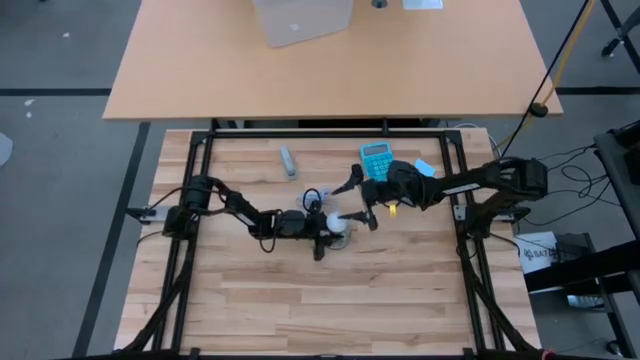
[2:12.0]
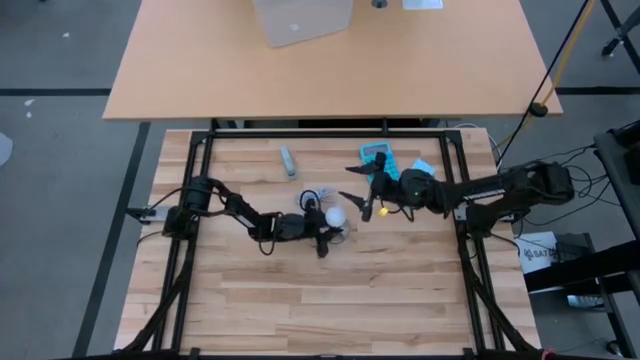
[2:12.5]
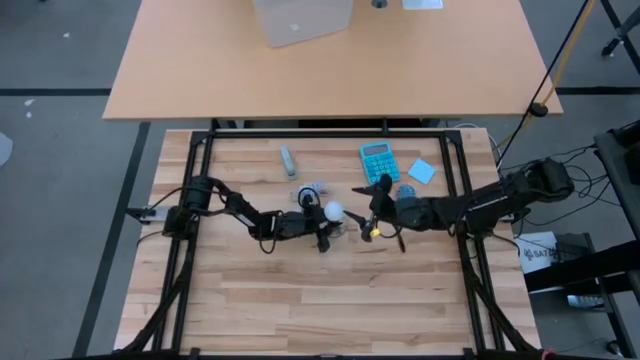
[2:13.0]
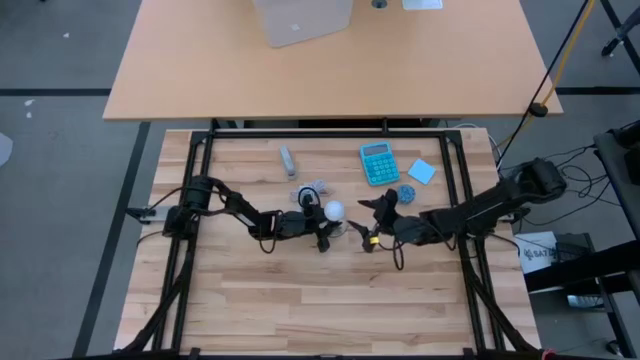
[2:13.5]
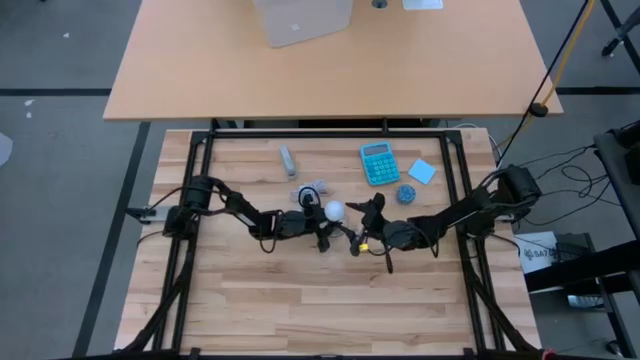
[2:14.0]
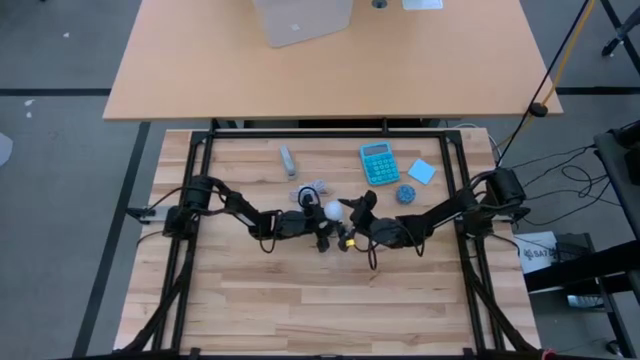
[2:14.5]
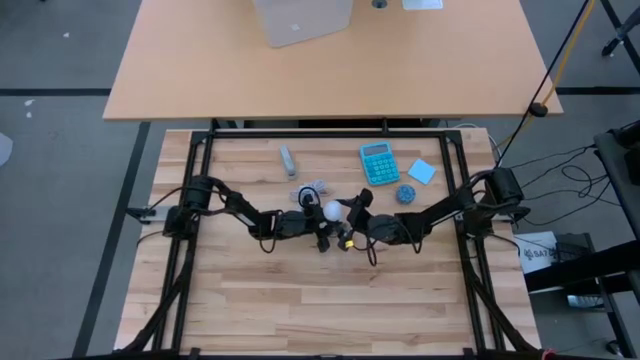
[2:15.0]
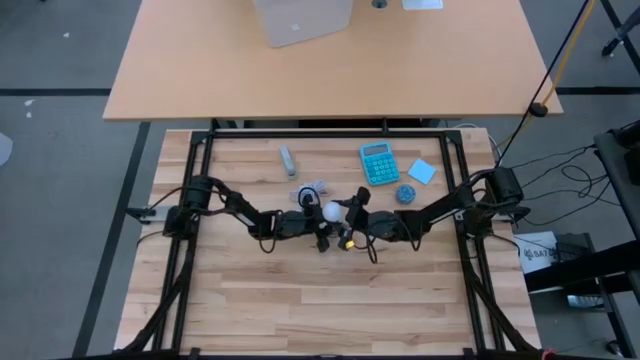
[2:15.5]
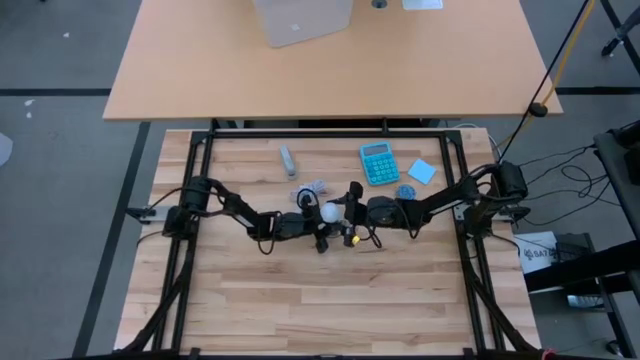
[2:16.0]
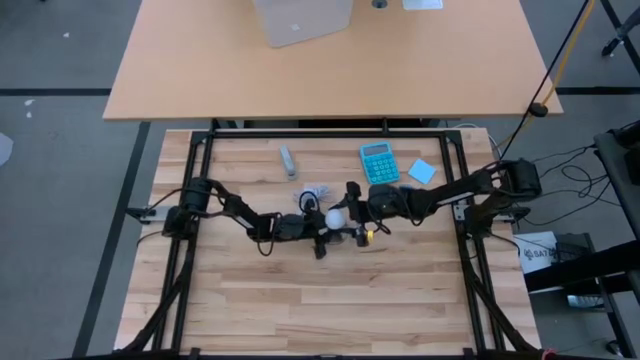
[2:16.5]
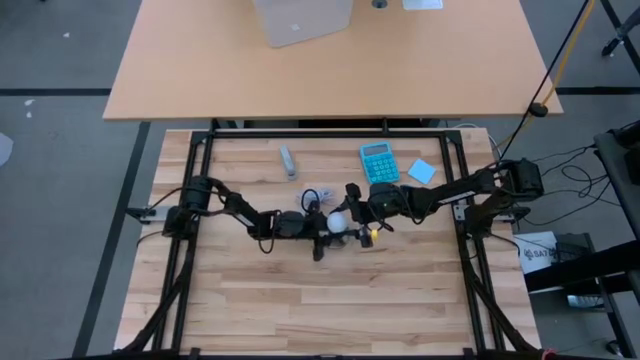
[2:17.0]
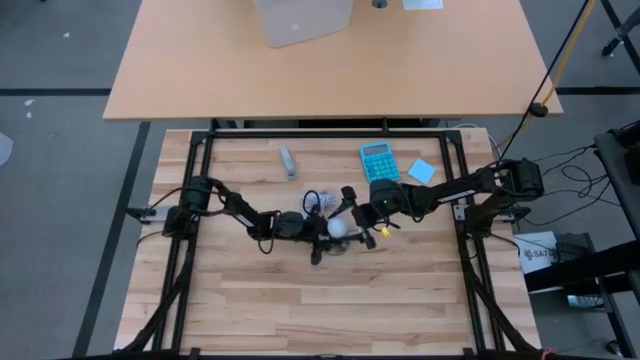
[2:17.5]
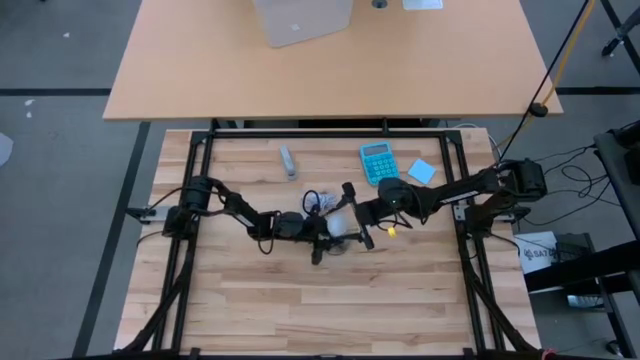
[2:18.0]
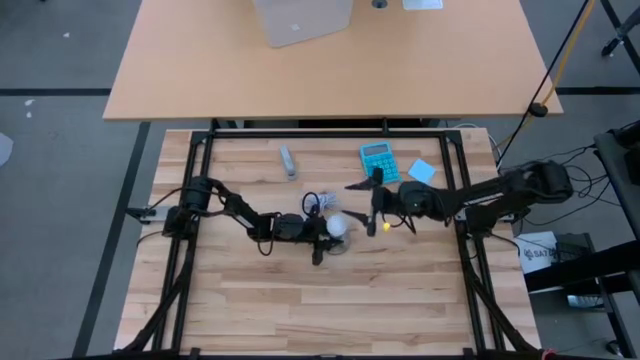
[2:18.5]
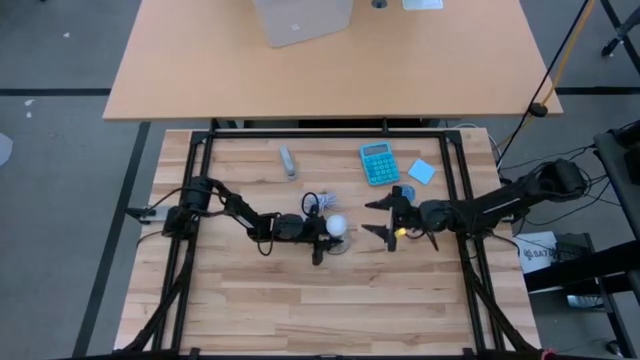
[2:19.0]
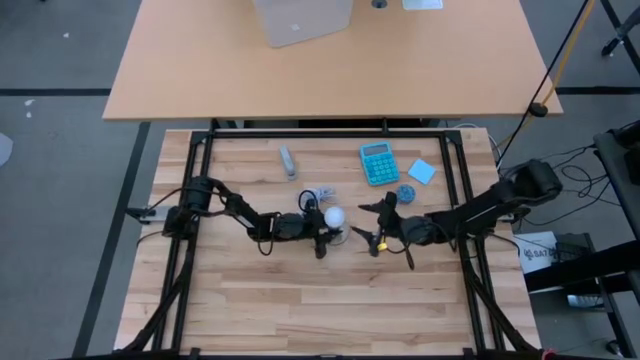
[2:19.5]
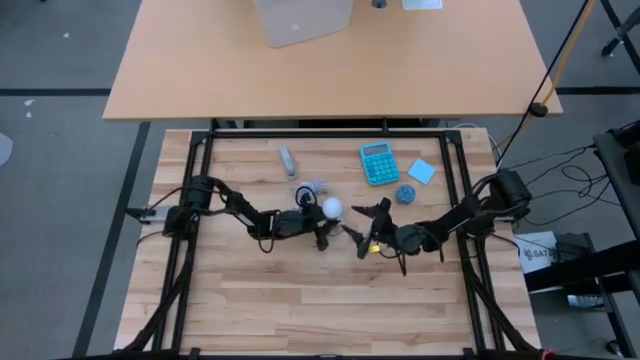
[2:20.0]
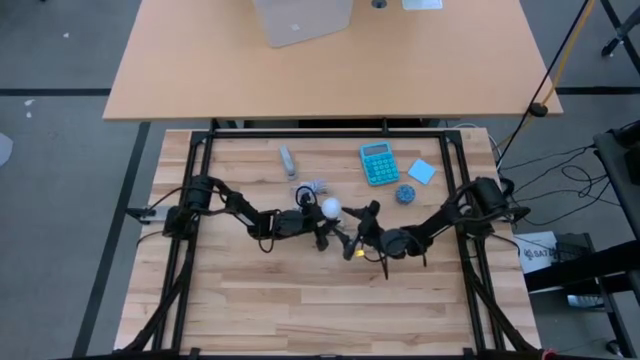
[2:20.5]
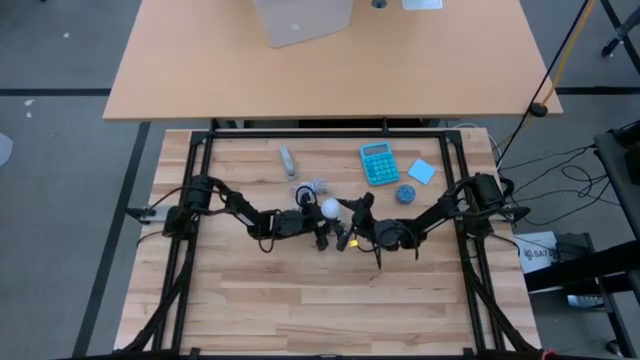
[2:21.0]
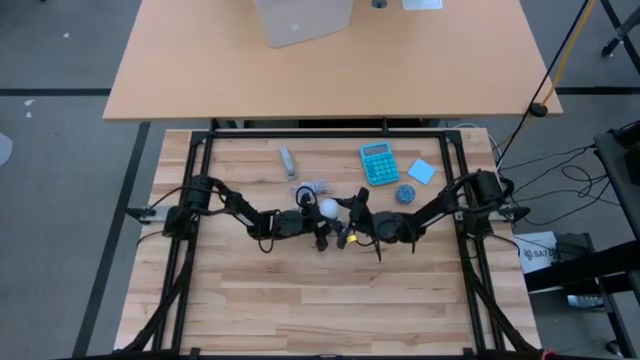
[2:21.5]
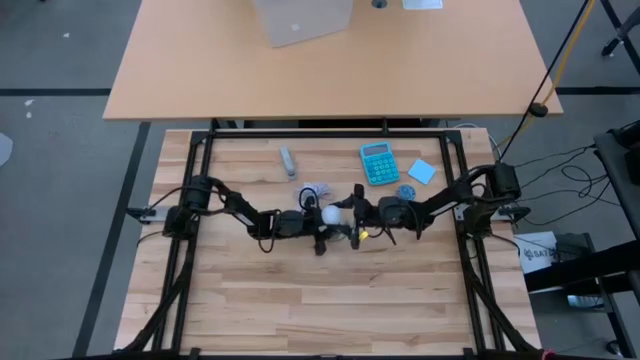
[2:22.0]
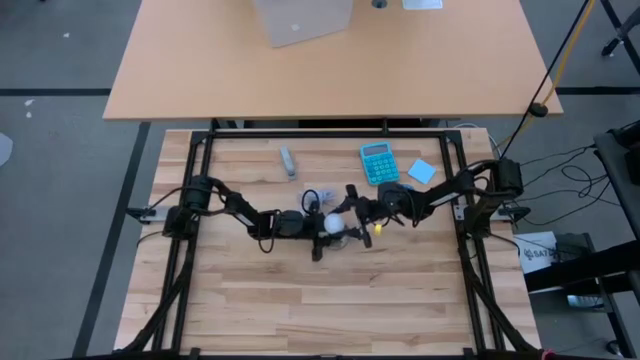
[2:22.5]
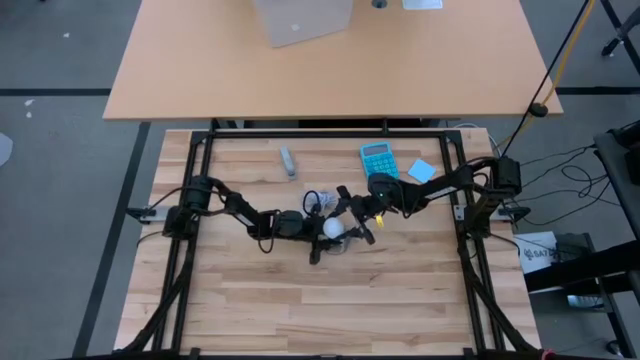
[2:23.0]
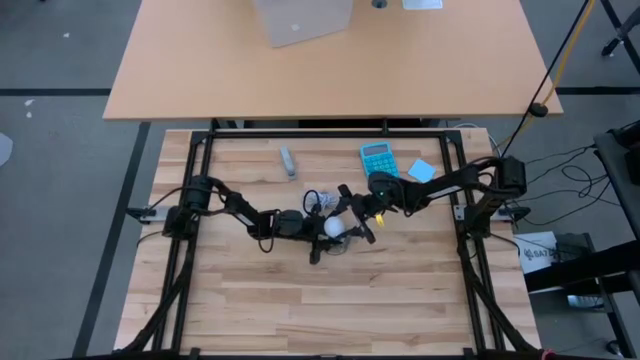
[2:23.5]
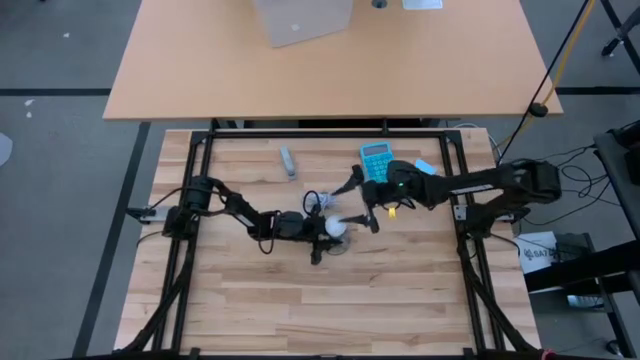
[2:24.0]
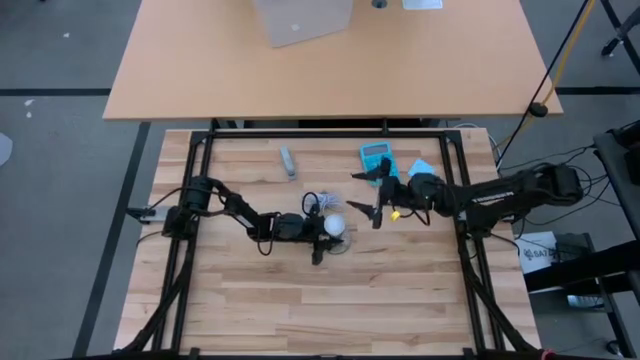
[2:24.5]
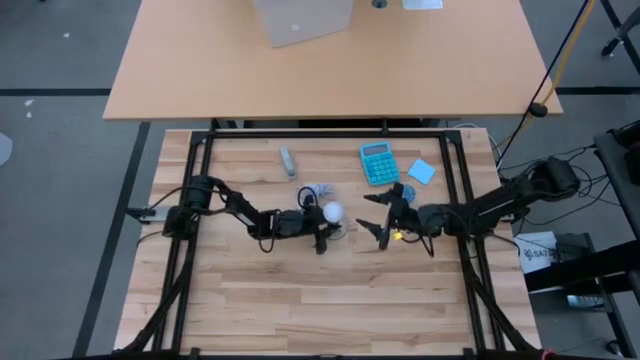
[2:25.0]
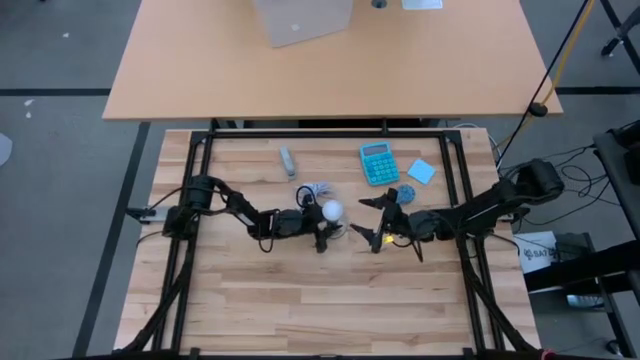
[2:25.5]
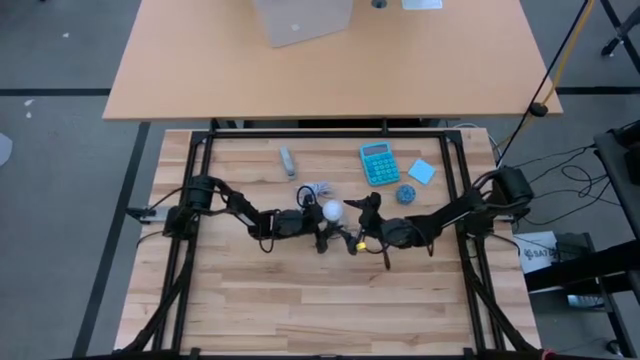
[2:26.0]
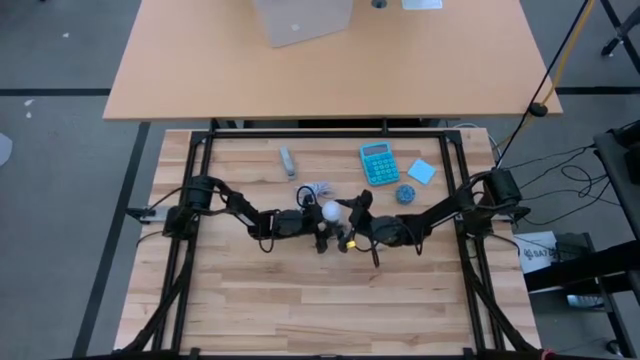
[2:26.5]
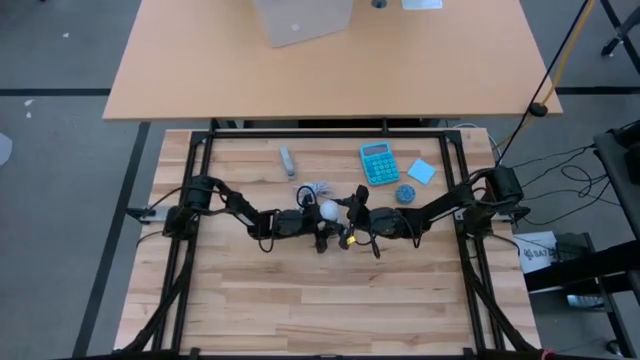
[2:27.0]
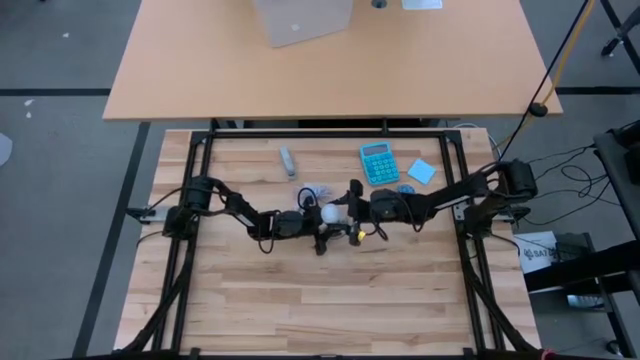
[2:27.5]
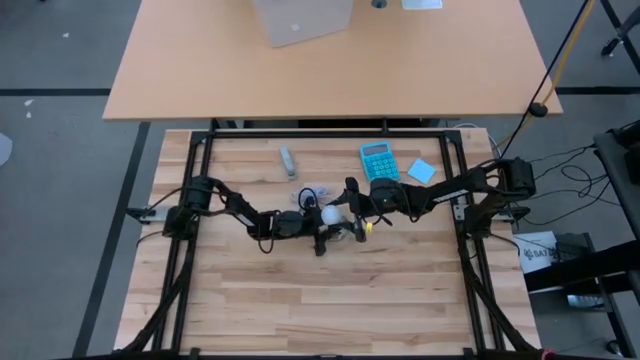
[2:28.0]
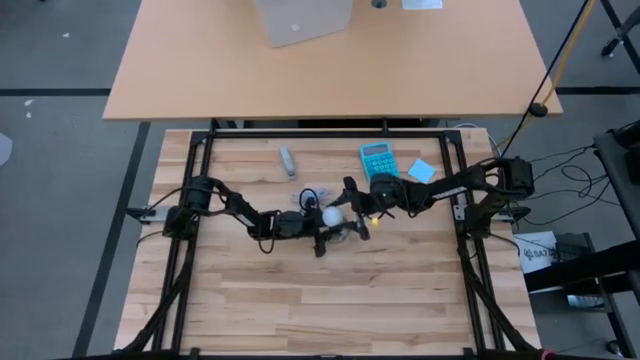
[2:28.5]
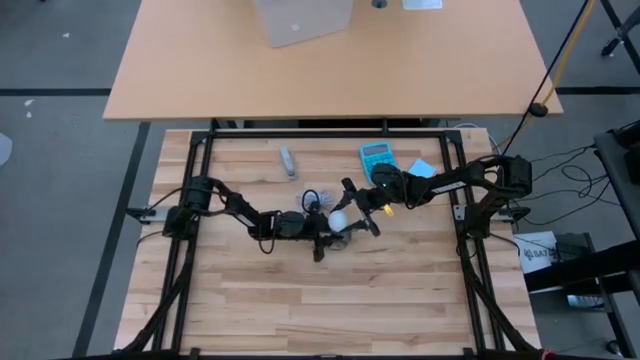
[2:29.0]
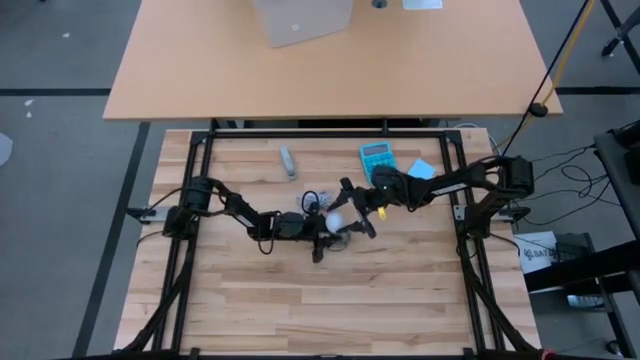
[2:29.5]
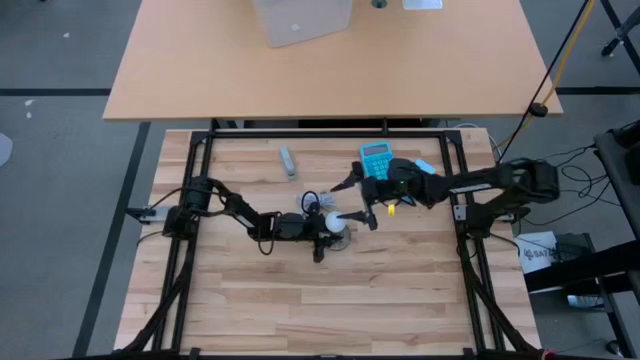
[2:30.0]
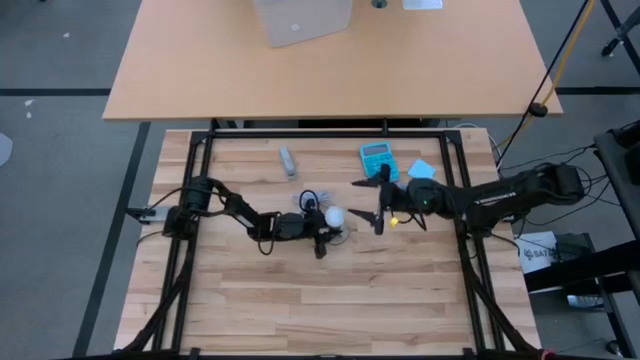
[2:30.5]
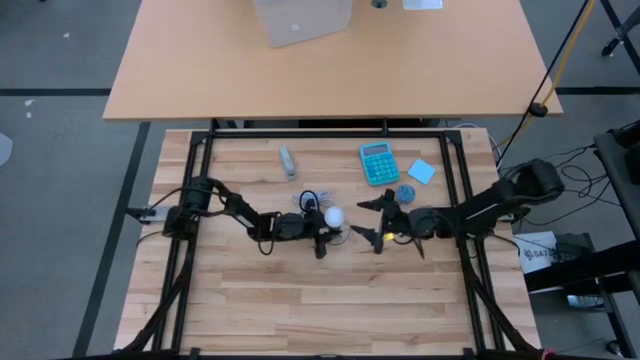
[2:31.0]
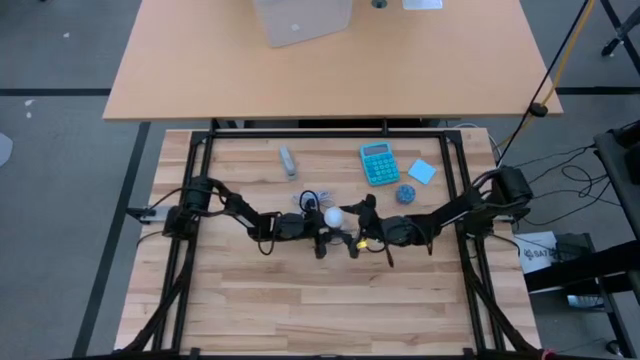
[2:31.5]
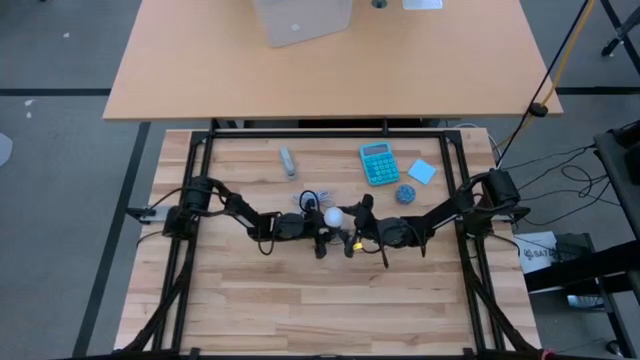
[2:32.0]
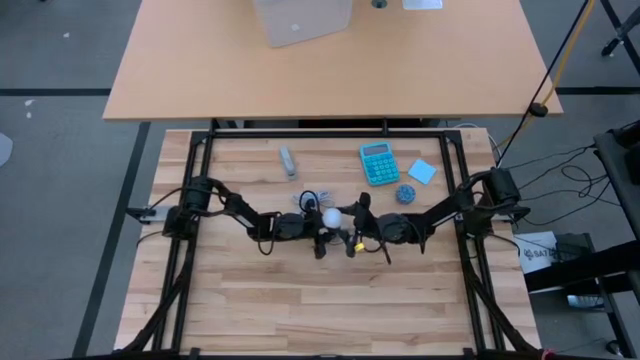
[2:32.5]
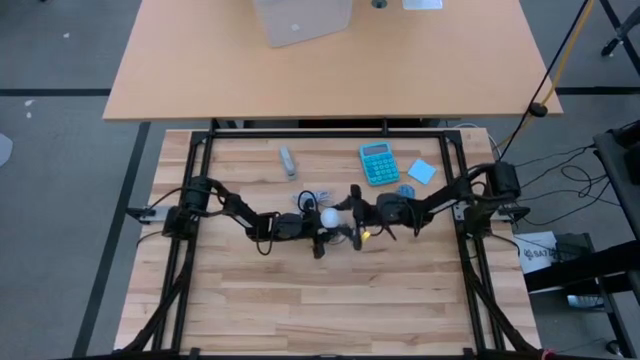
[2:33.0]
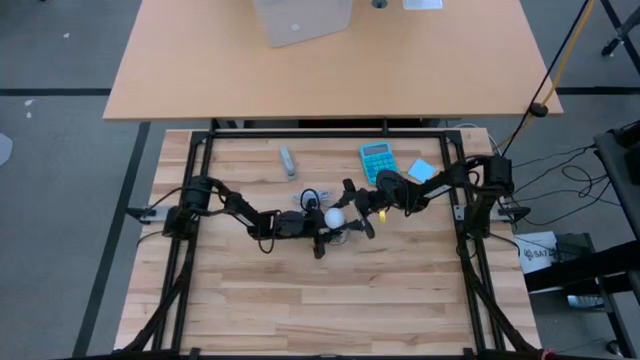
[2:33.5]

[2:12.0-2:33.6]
Task: Screw lightbulb
Remove the white lightbulb from the desk lamp
